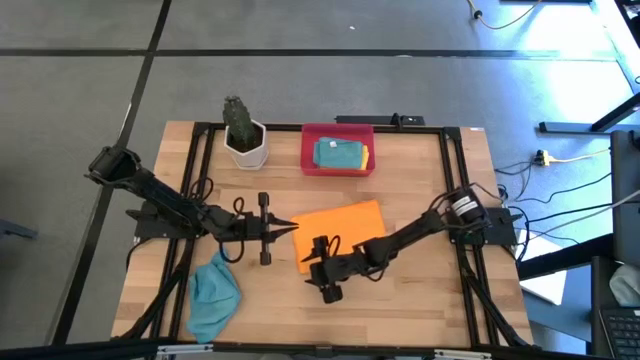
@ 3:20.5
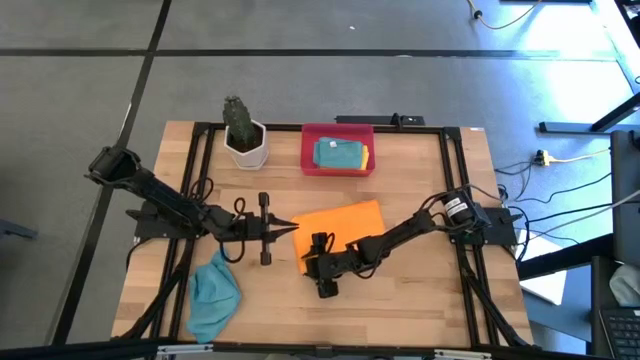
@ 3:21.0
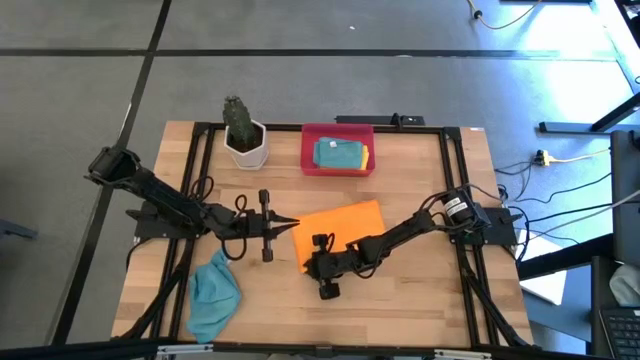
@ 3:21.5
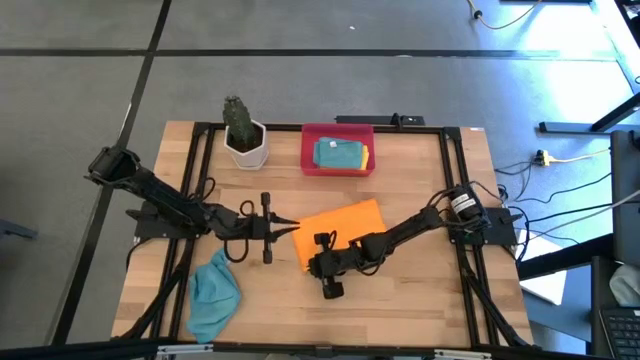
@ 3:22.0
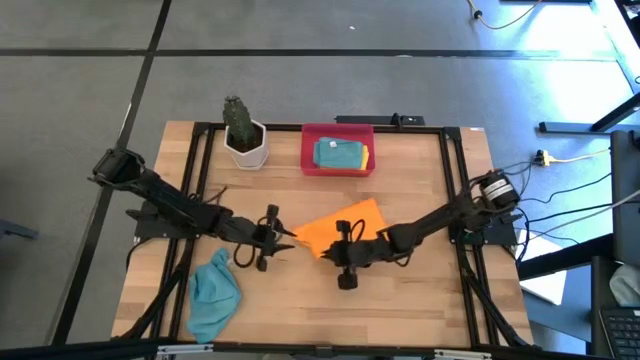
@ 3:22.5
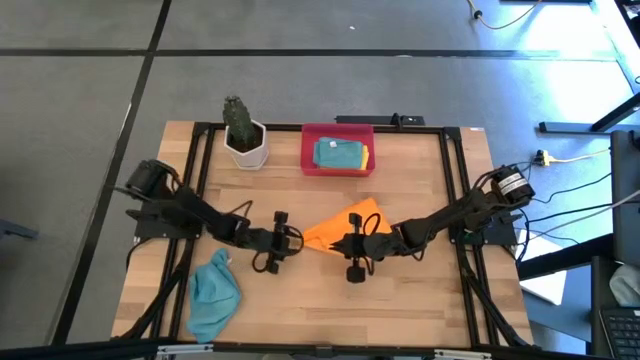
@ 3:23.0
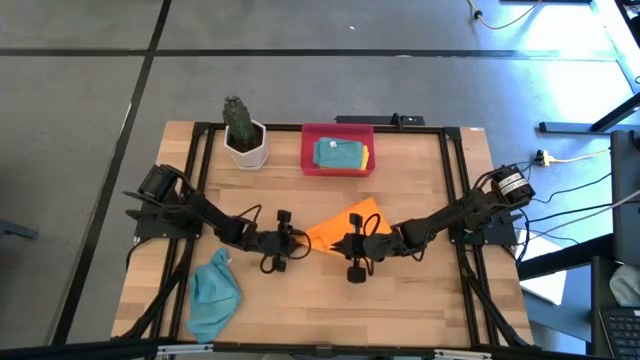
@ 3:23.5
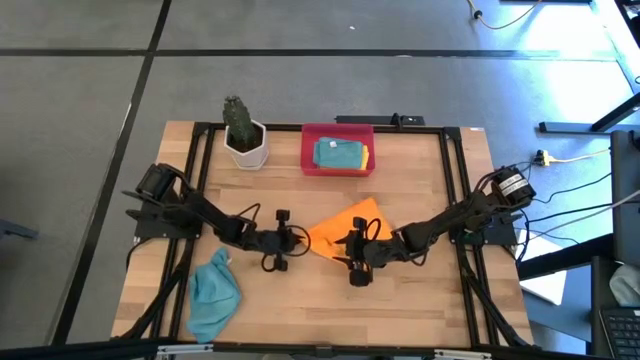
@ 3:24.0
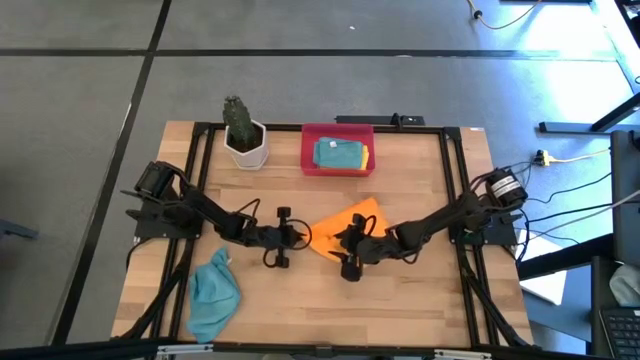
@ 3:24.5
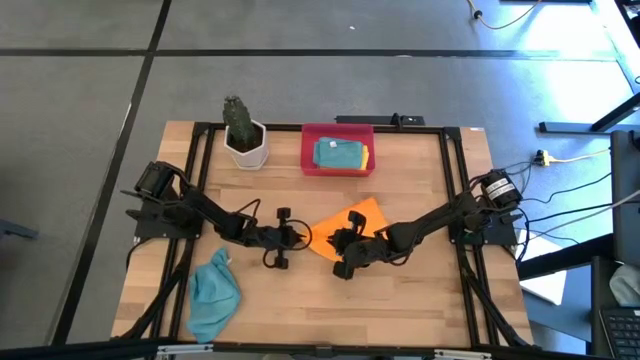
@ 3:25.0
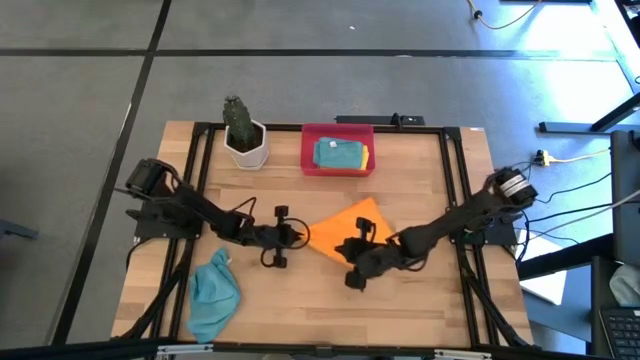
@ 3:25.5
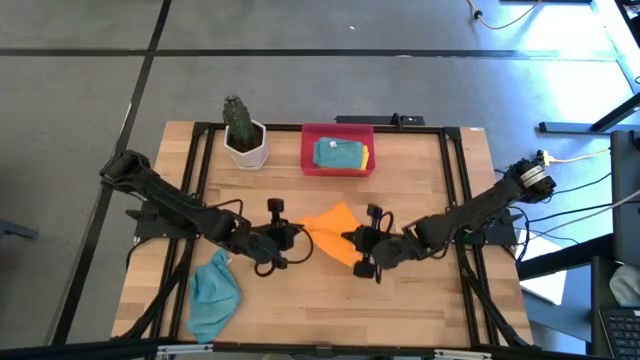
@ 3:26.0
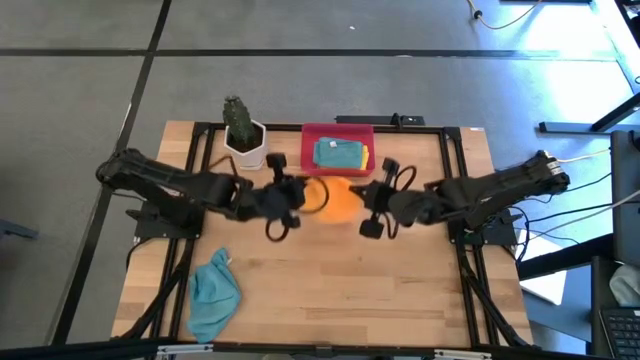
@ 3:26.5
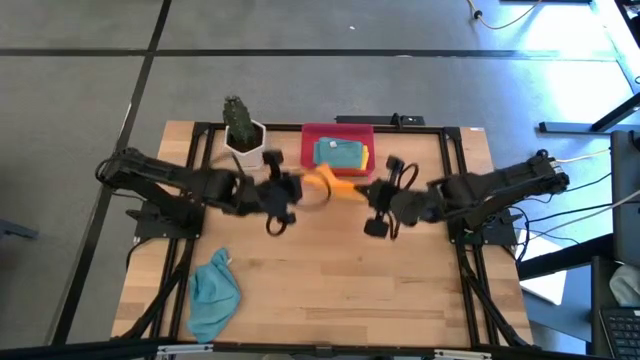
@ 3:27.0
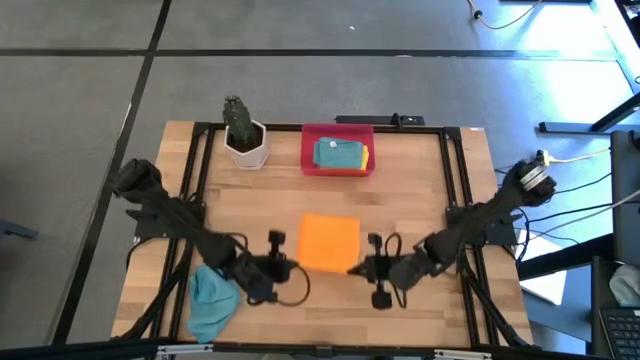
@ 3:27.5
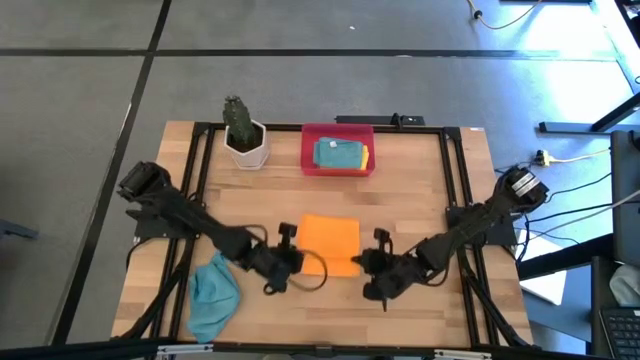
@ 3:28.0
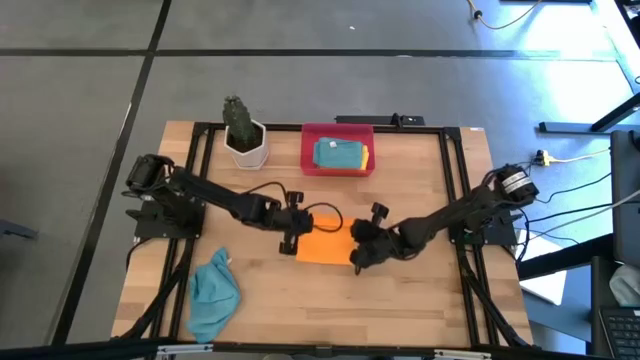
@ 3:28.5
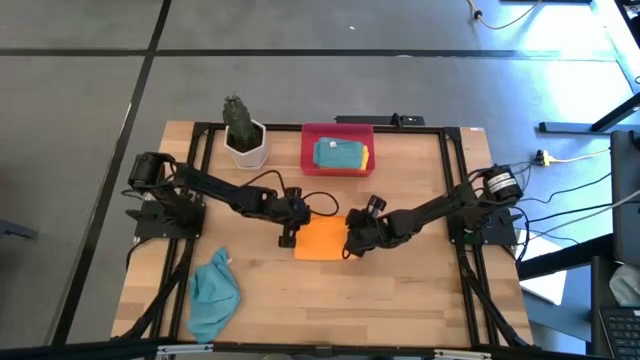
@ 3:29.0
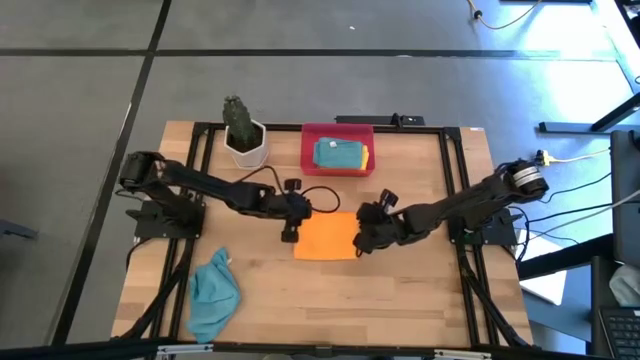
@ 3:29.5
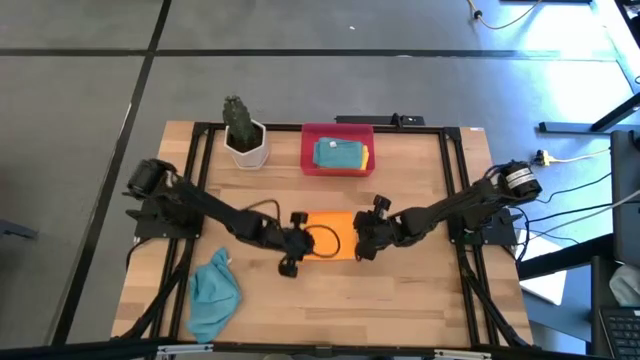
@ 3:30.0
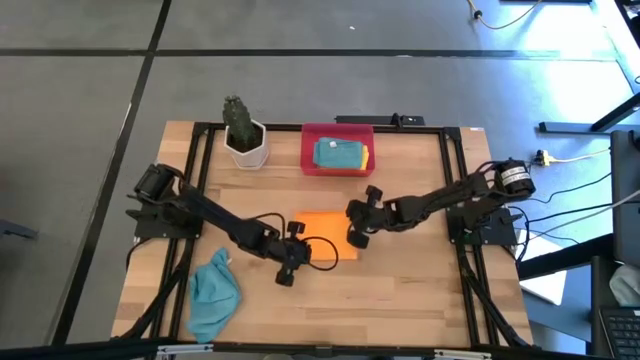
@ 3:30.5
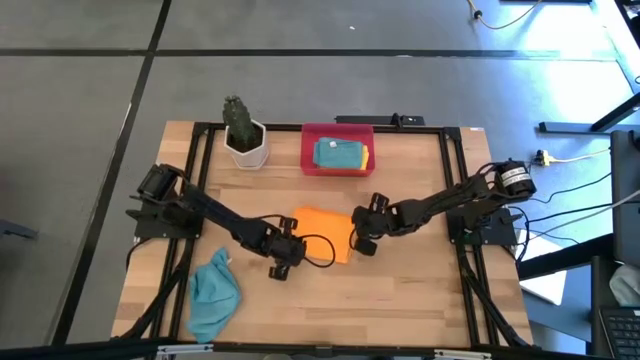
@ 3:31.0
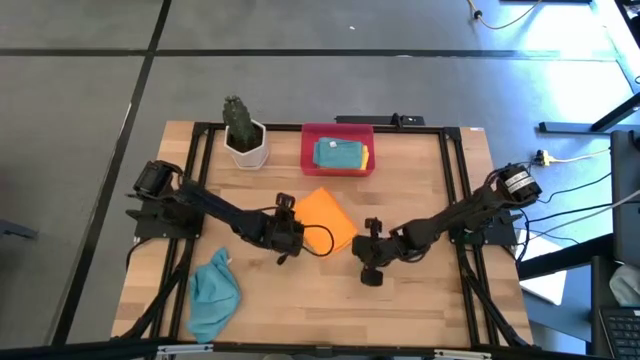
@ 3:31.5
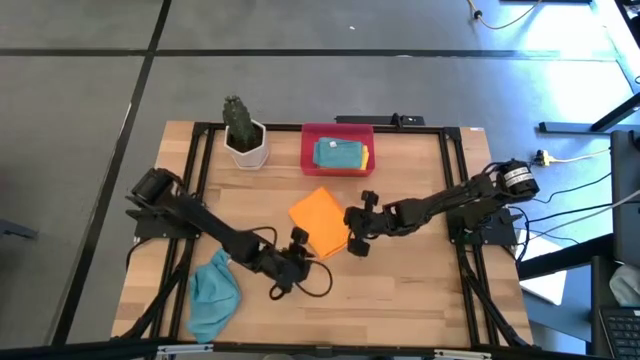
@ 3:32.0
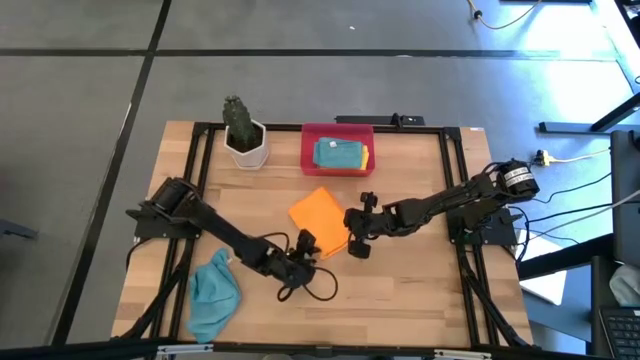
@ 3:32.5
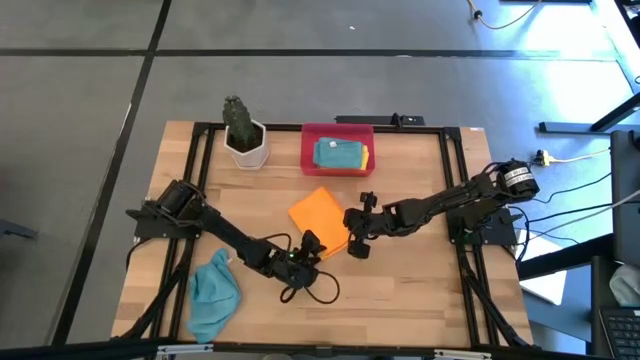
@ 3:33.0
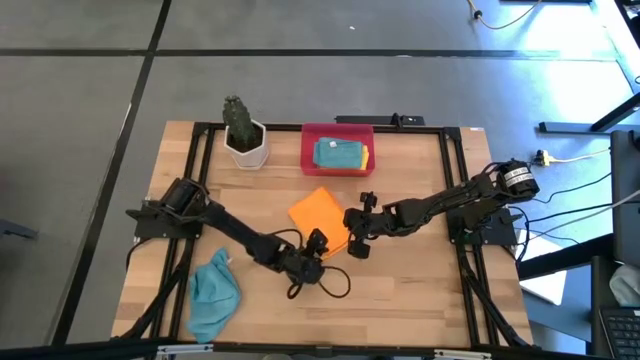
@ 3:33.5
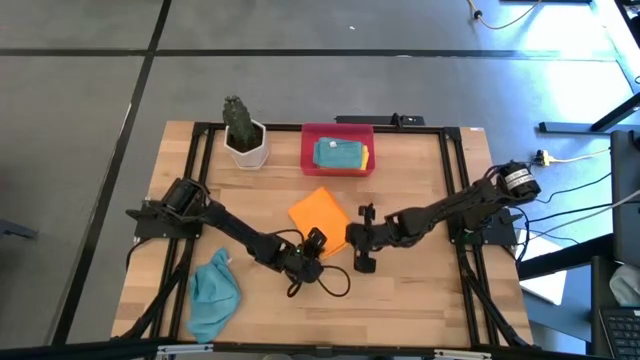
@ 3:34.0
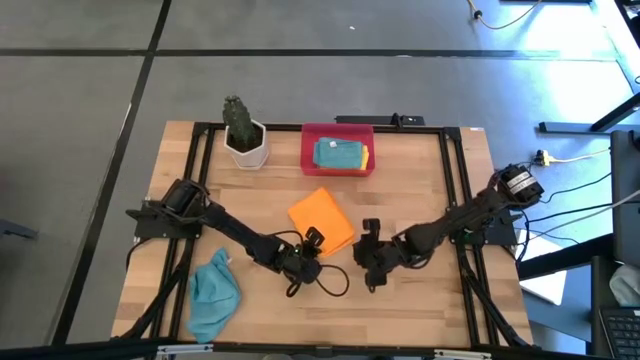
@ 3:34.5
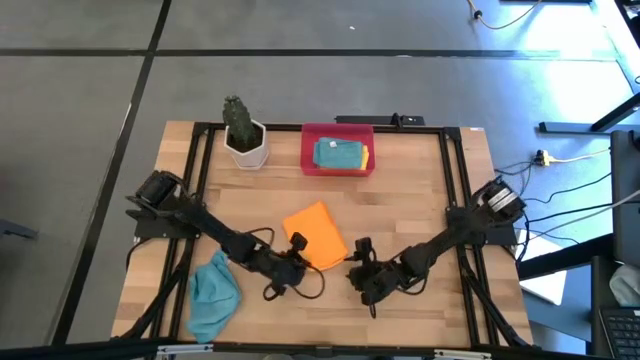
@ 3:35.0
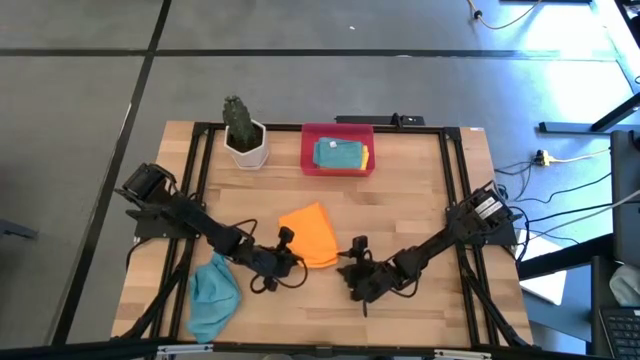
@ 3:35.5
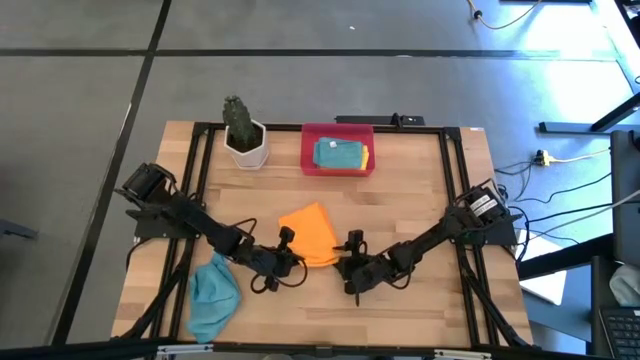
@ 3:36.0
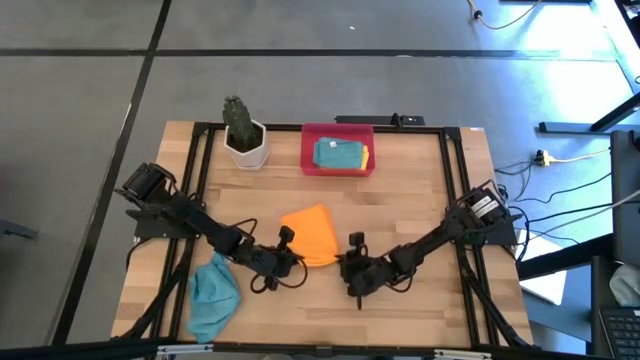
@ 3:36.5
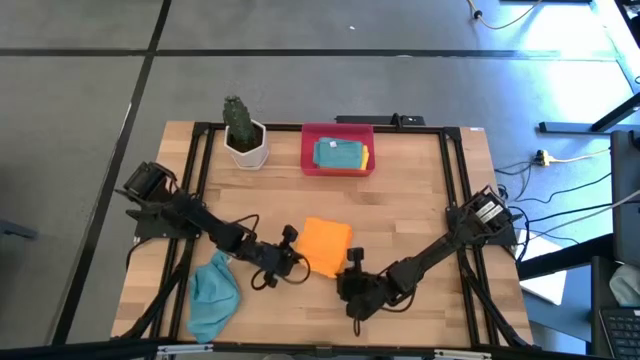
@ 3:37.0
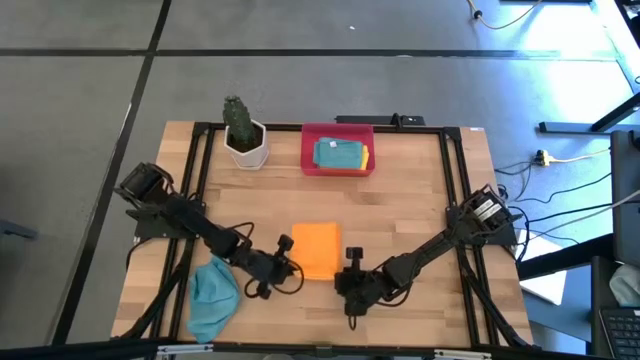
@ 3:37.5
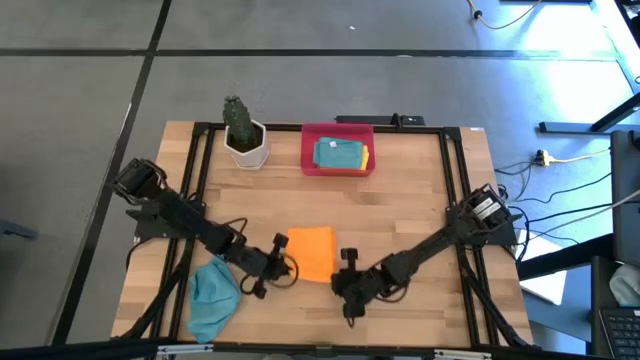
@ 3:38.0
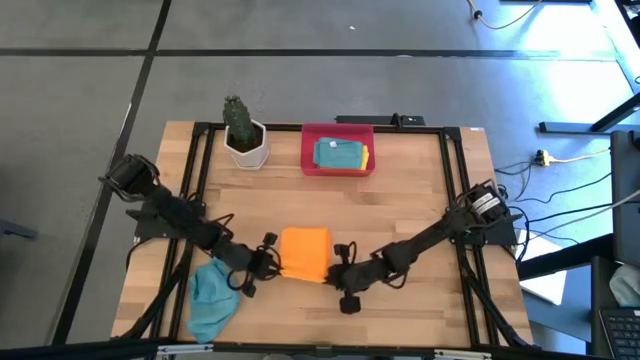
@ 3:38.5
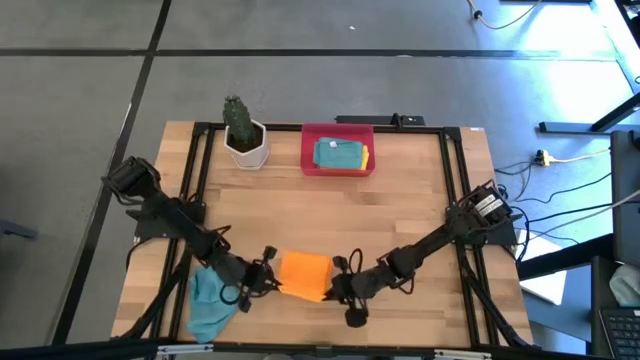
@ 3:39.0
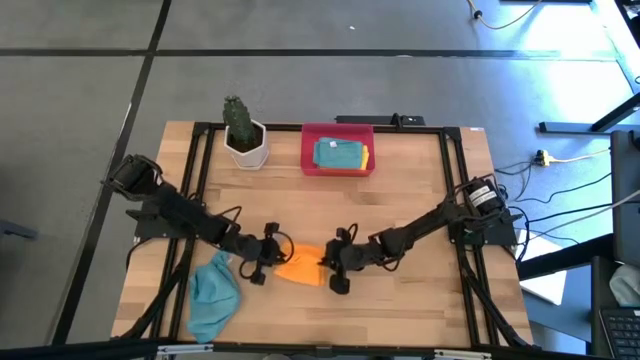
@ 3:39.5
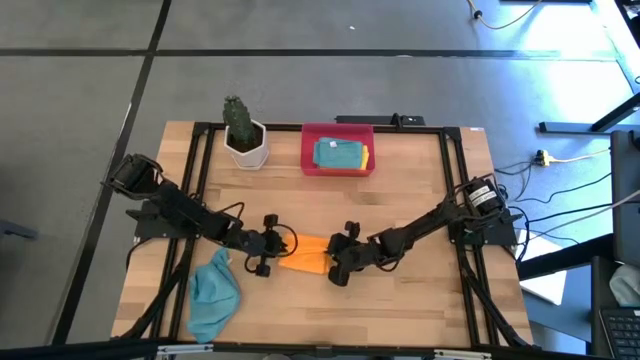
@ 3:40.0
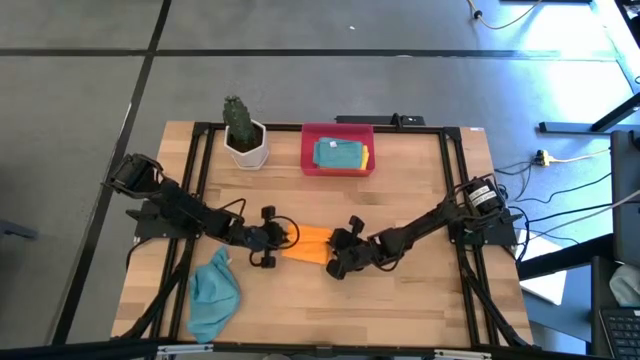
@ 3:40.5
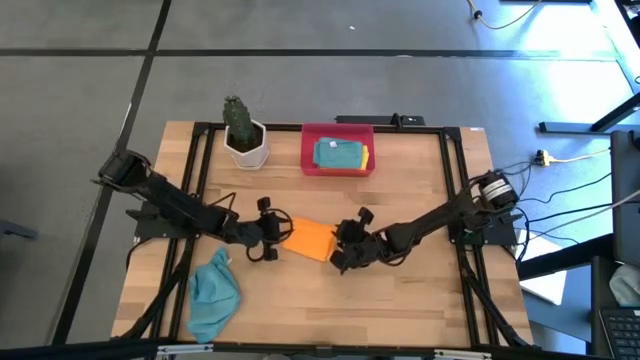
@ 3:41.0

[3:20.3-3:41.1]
Task: Fold microfiber towels
Fold the orange microfiber cloth
